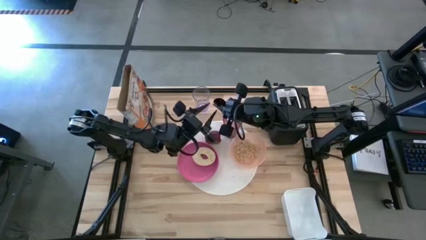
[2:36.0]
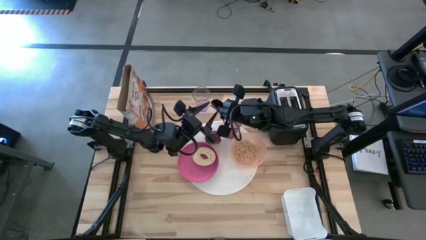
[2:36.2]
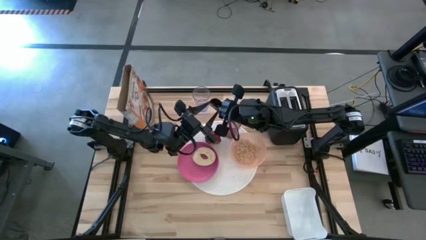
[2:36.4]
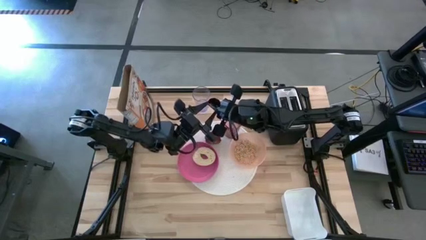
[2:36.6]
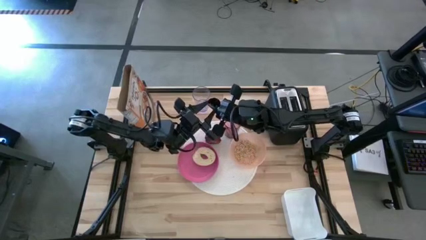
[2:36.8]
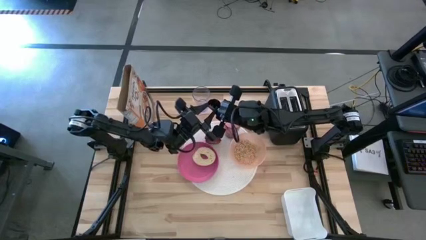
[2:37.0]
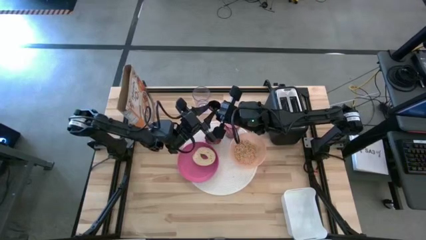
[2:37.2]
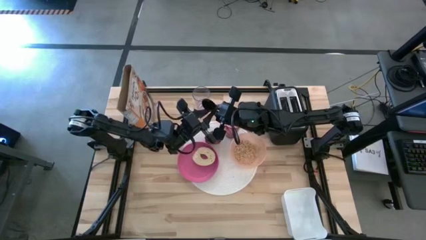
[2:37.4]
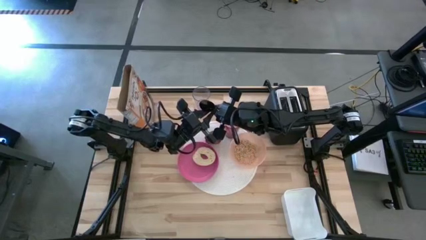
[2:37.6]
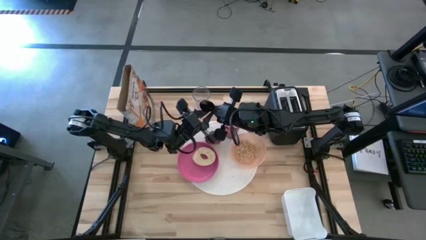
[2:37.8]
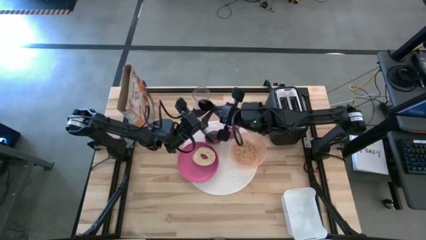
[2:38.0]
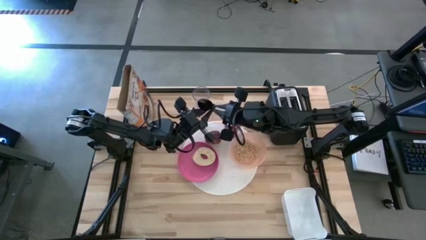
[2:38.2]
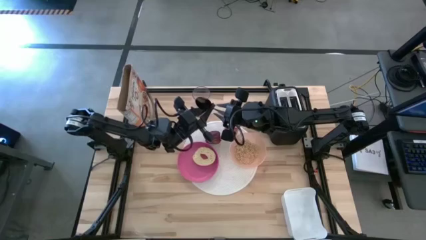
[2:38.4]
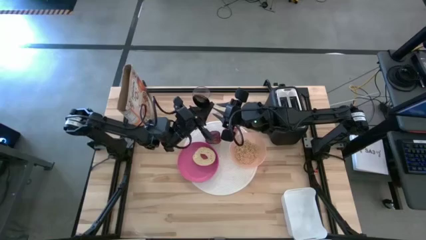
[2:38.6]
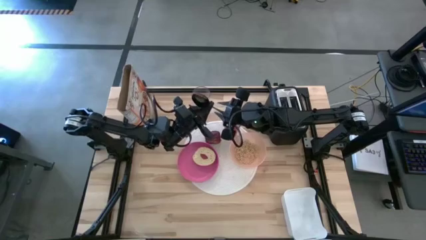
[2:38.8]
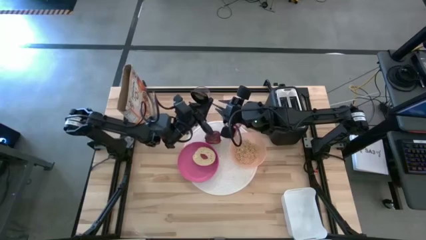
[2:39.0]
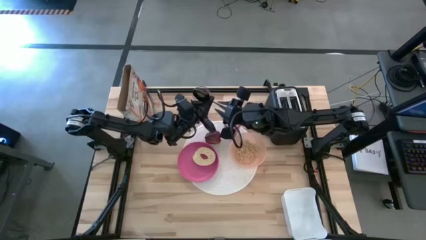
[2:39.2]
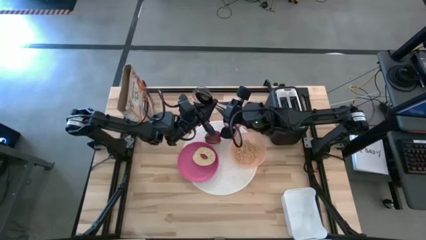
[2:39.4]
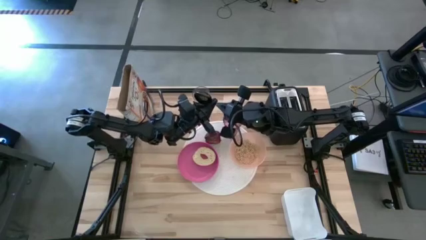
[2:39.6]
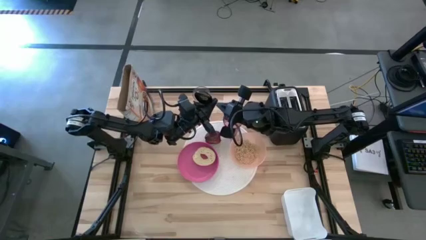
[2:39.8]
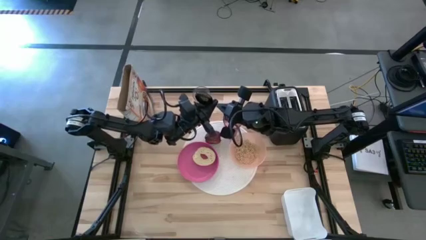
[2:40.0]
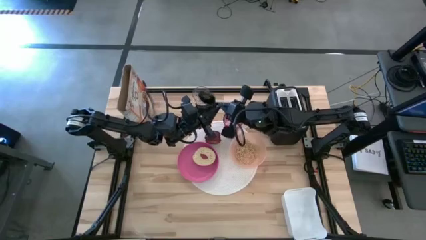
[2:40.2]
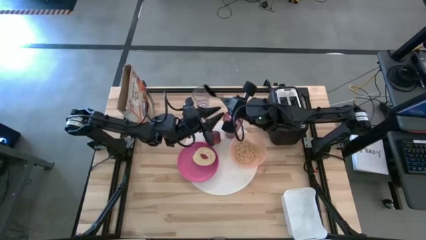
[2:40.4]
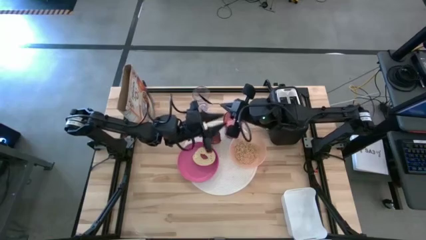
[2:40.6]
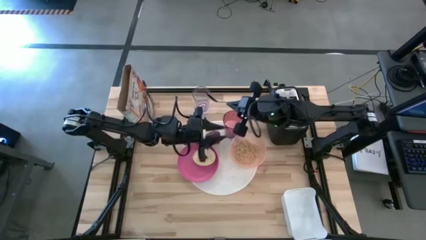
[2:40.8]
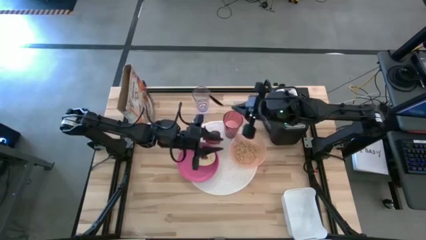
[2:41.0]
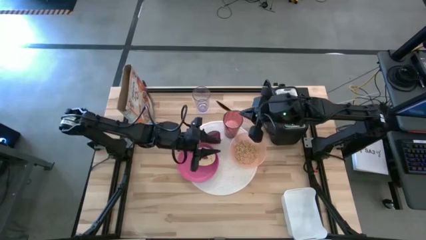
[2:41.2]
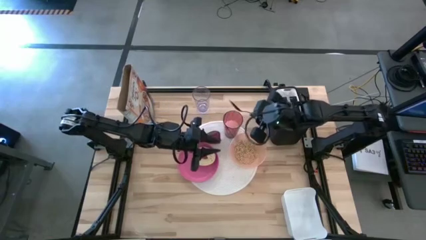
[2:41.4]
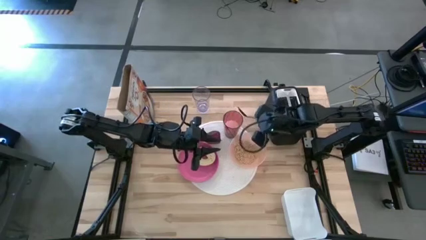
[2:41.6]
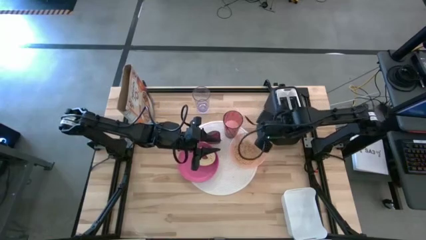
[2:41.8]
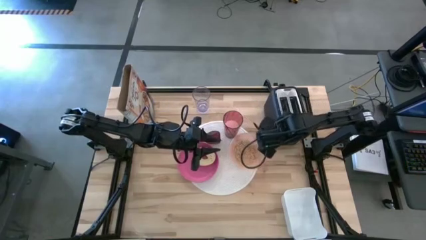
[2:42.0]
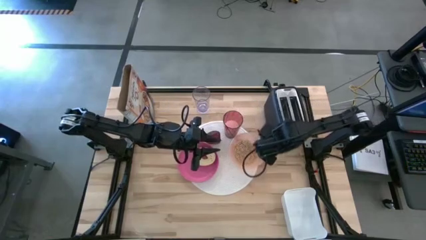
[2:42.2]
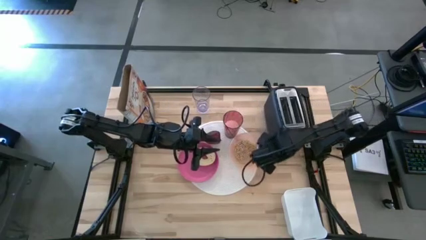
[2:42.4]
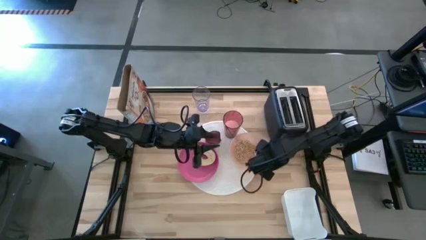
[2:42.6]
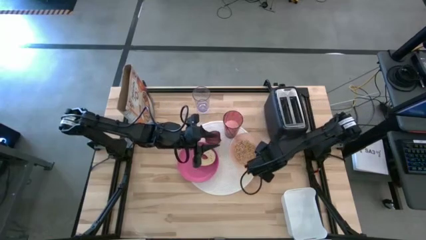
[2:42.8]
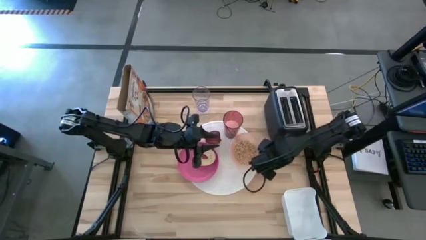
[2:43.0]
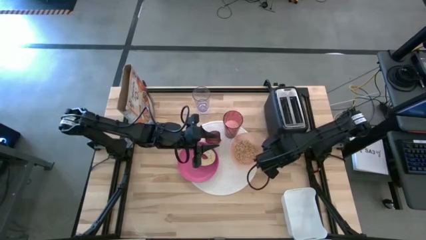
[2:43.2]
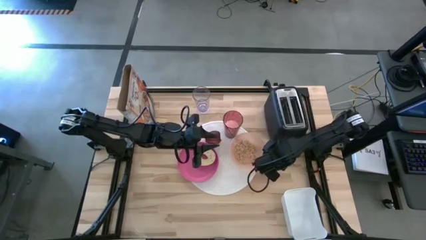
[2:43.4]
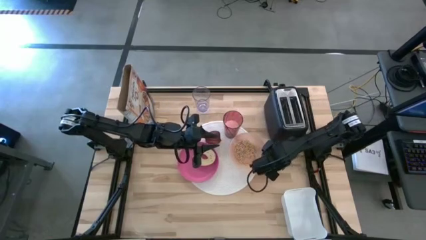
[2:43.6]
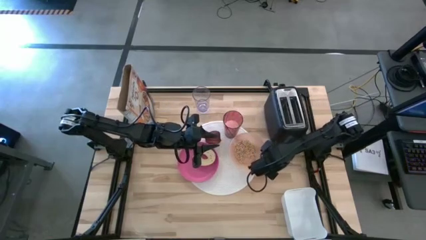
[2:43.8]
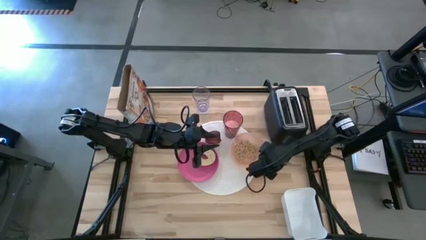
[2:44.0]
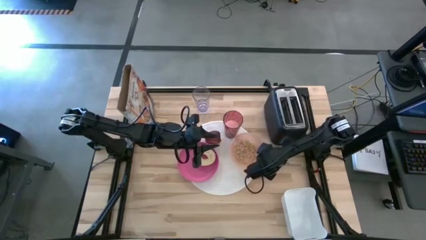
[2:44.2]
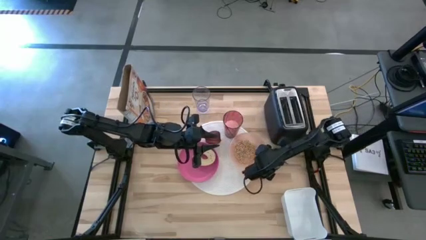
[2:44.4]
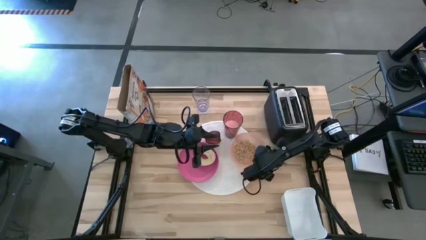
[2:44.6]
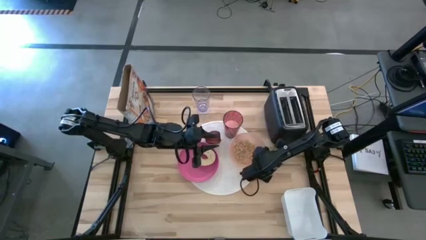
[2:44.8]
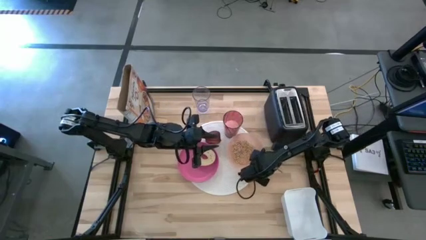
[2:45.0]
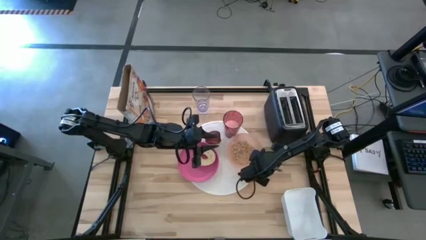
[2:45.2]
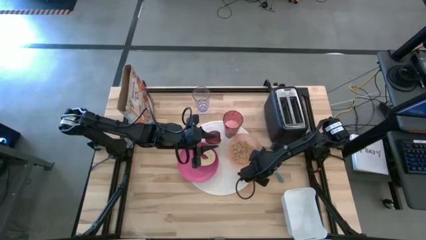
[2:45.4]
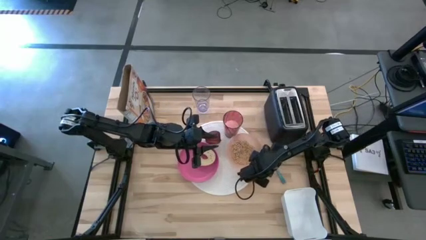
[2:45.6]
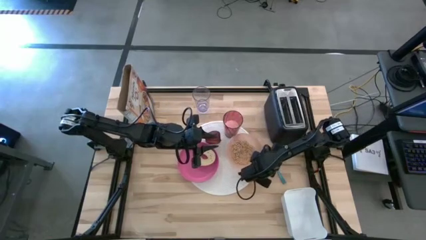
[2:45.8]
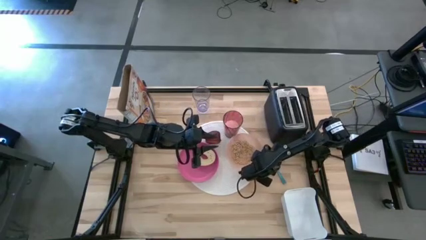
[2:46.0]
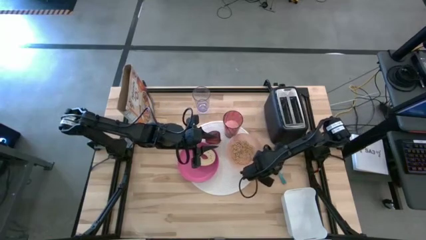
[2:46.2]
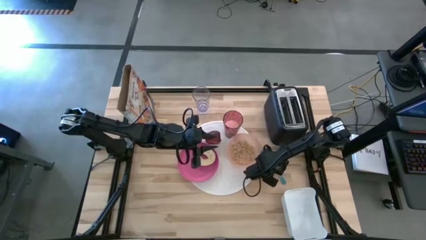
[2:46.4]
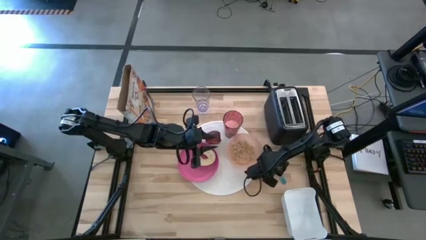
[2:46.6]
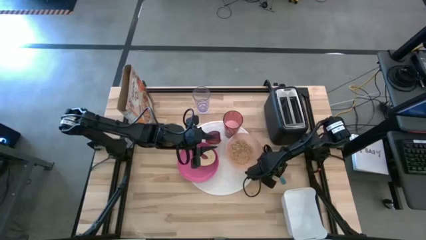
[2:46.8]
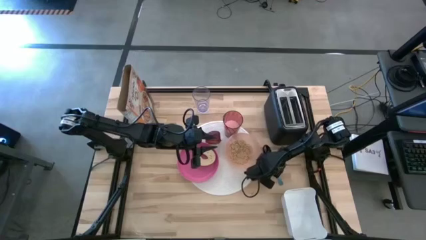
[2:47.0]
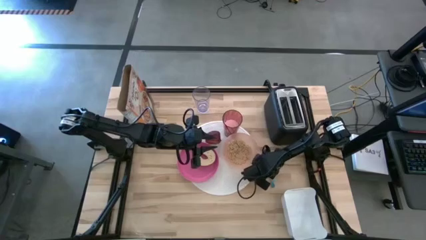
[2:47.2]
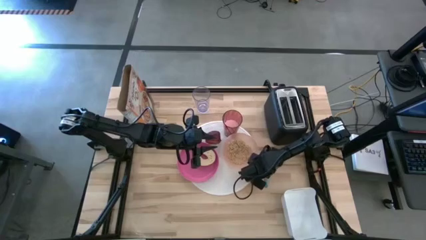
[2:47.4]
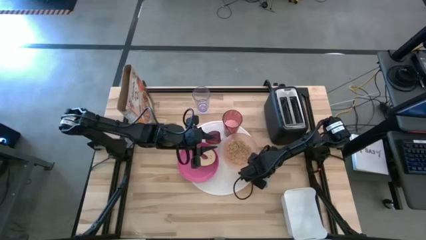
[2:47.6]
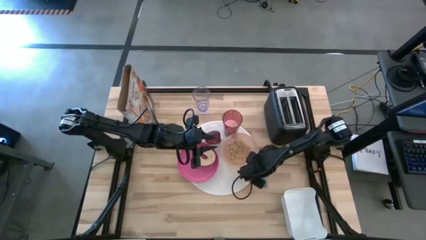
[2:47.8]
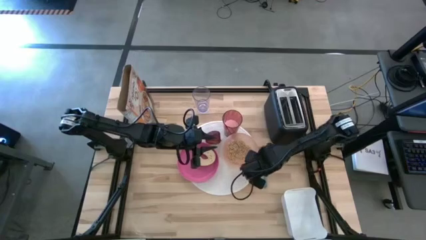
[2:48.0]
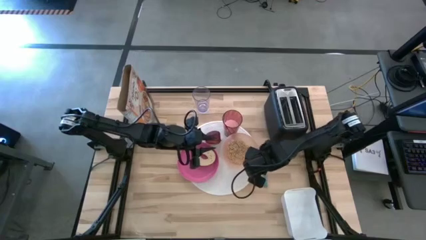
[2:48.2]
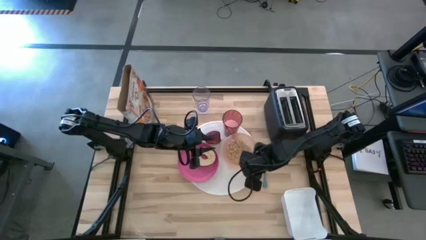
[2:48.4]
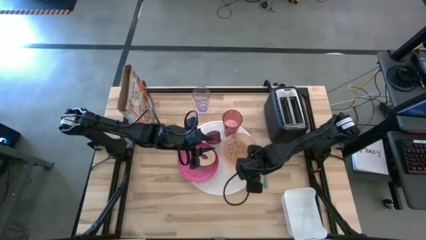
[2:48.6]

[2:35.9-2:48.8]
Task: Arrange a breakfast setting
Put the blue spoon on the right side of the white place mat

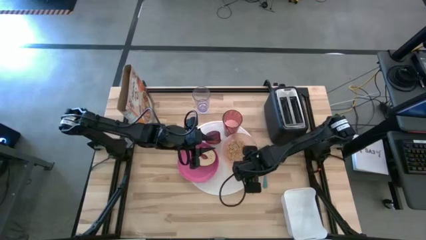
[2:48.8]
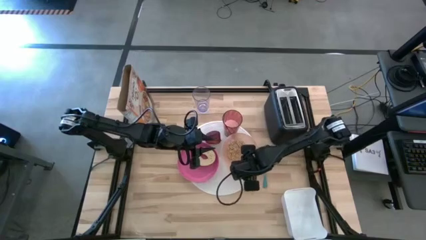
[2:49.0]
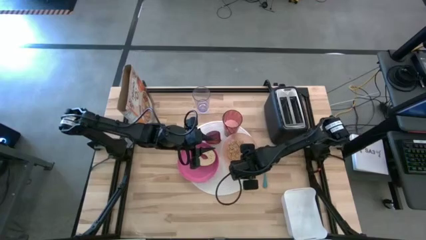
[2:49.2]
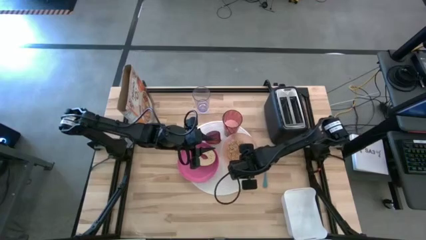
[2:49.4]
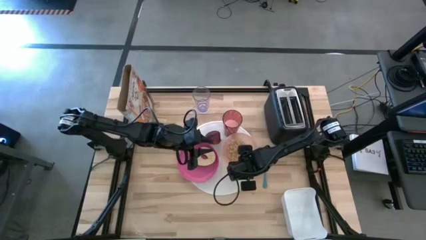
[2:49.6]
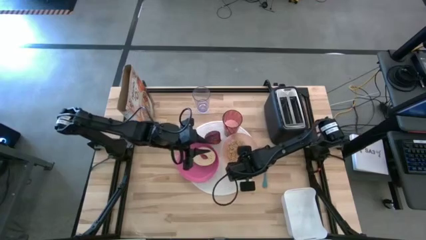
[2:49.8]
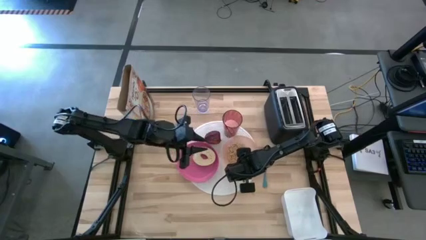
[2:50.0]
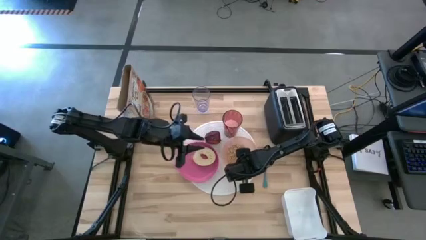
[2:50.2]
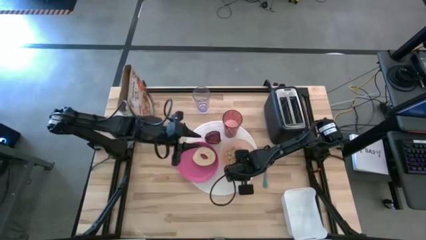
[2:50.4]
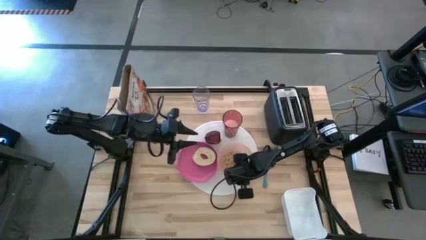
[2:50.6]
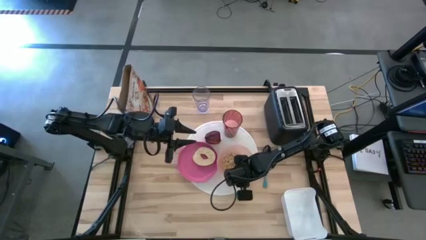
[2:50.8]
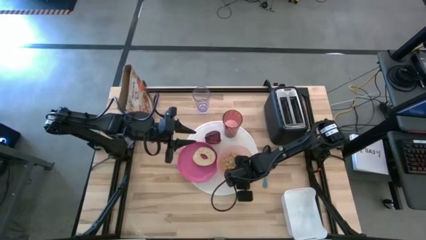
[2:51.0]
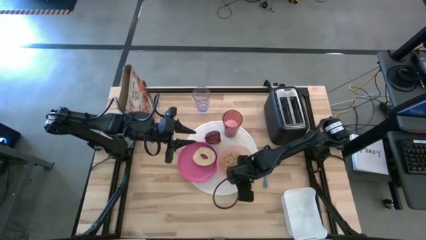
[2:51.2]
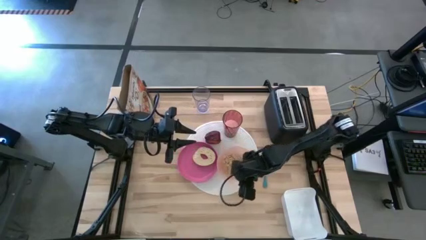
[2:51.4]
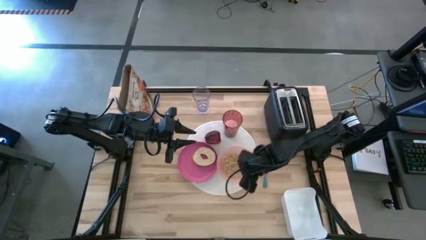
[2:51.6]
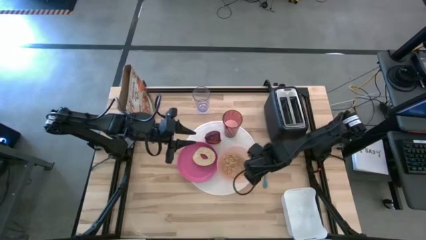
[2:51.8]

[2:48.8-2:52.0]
Adjust the orange bowl
